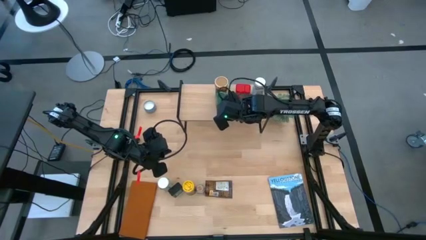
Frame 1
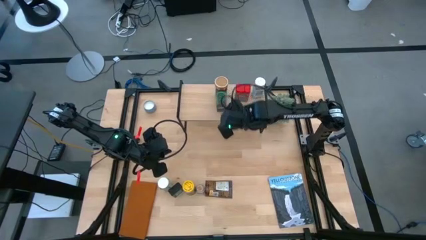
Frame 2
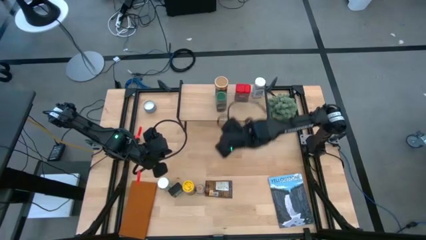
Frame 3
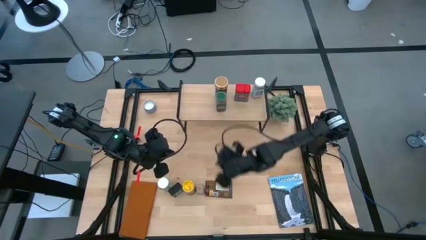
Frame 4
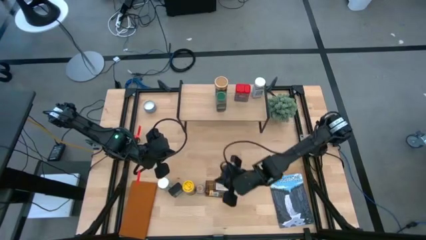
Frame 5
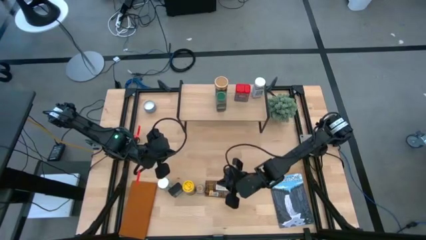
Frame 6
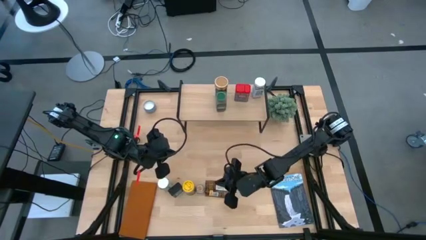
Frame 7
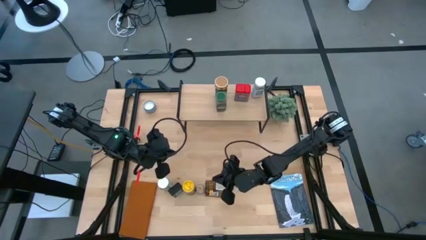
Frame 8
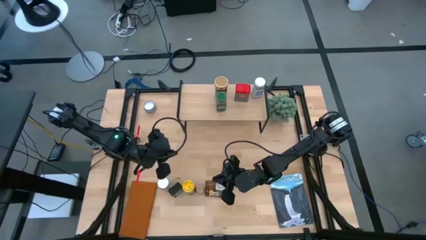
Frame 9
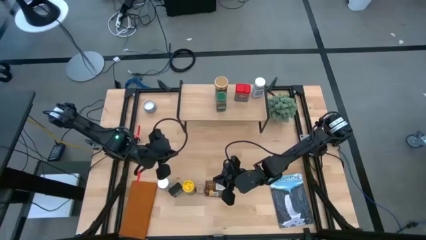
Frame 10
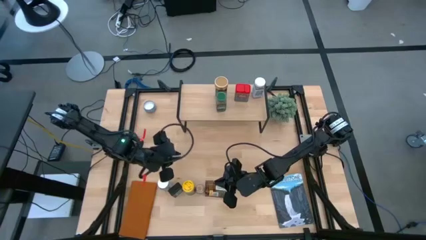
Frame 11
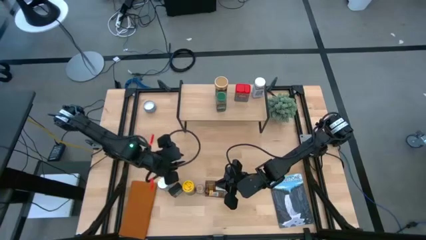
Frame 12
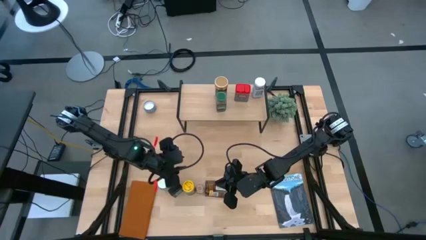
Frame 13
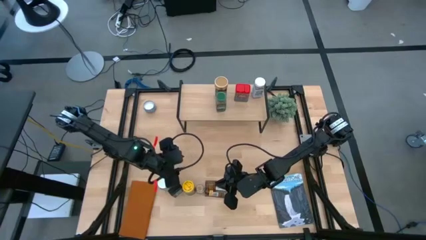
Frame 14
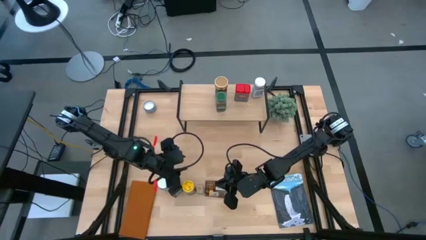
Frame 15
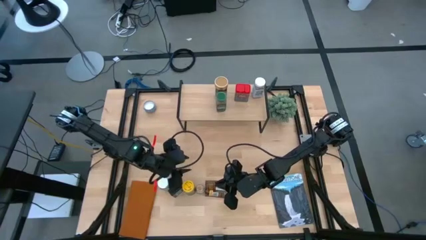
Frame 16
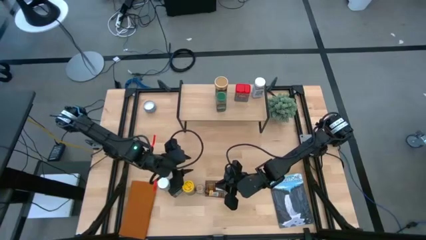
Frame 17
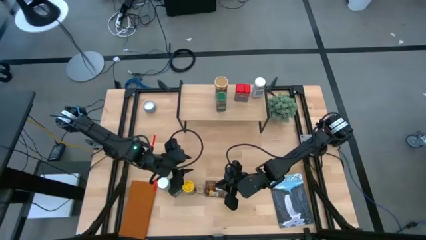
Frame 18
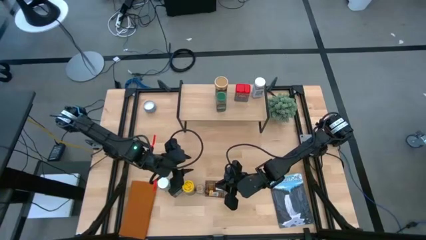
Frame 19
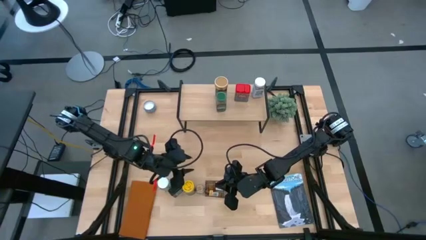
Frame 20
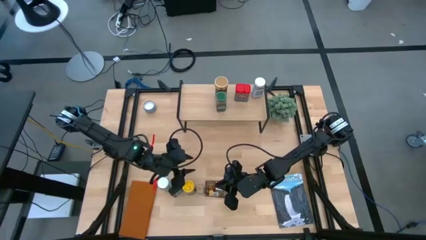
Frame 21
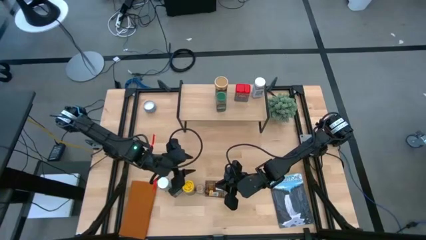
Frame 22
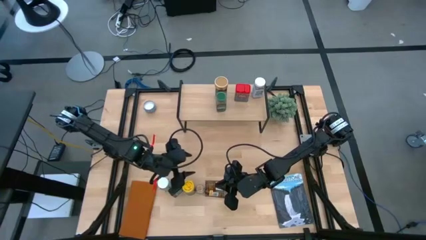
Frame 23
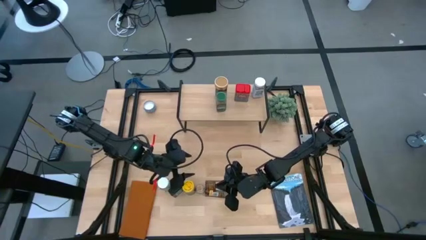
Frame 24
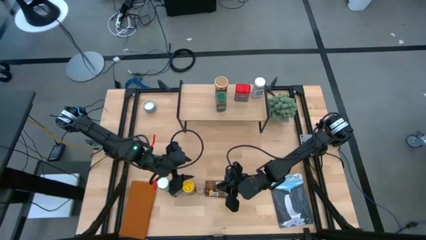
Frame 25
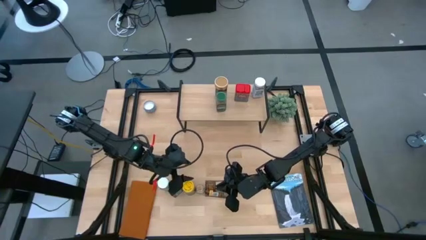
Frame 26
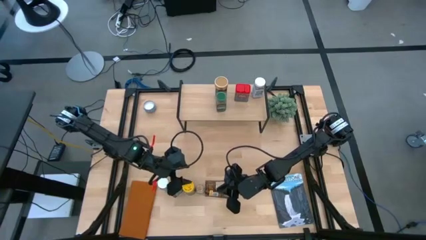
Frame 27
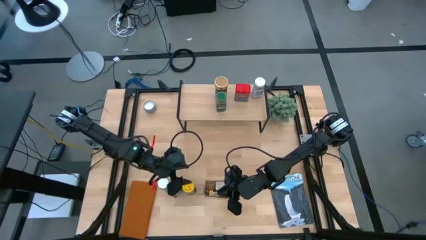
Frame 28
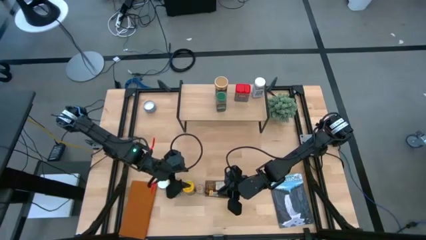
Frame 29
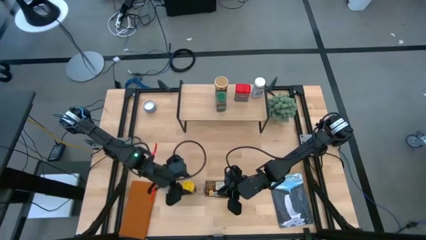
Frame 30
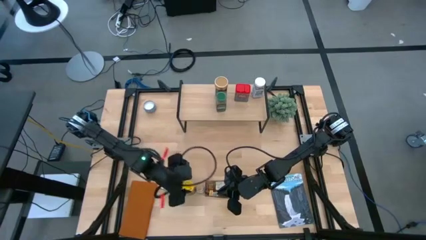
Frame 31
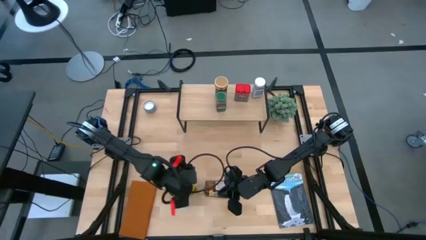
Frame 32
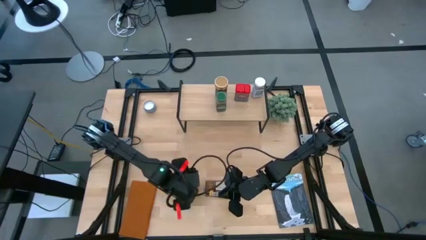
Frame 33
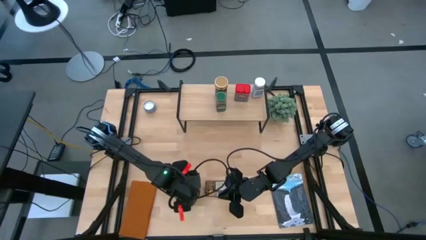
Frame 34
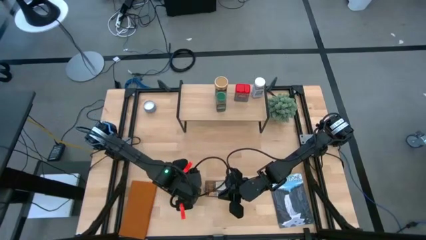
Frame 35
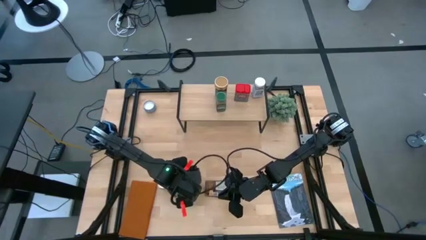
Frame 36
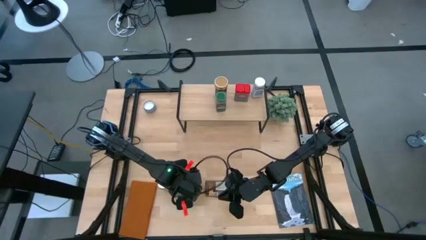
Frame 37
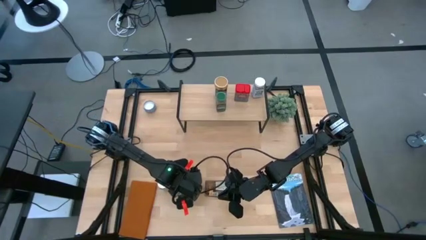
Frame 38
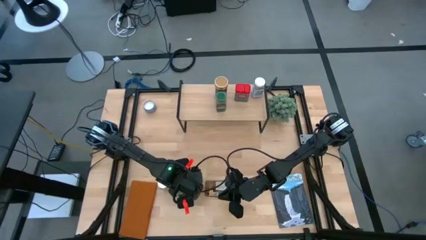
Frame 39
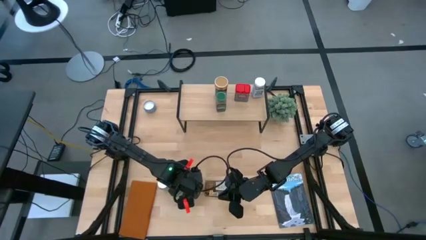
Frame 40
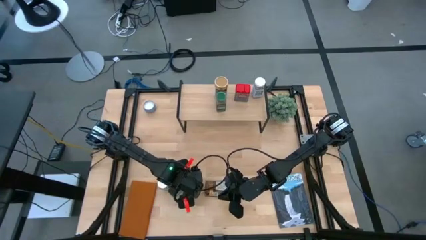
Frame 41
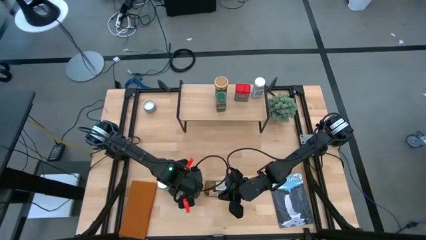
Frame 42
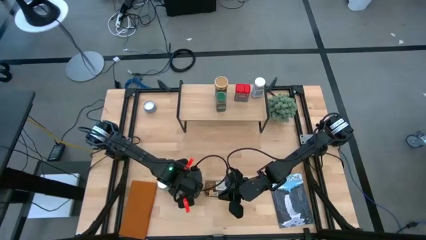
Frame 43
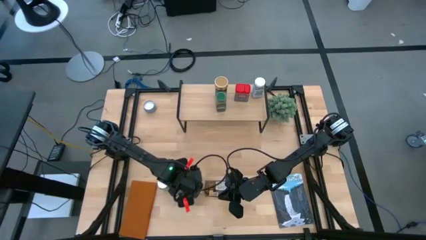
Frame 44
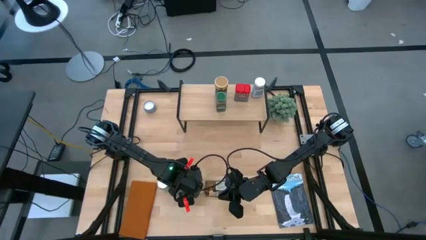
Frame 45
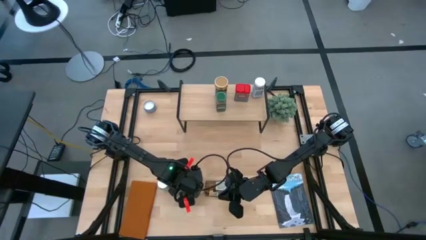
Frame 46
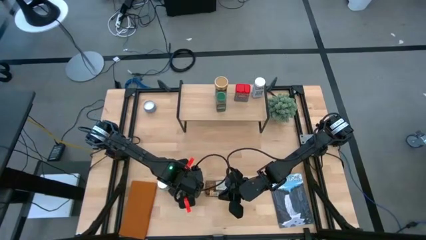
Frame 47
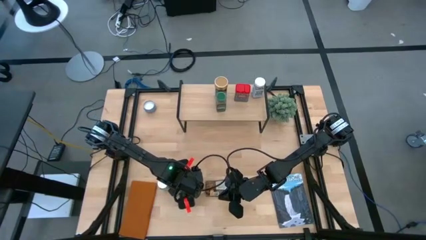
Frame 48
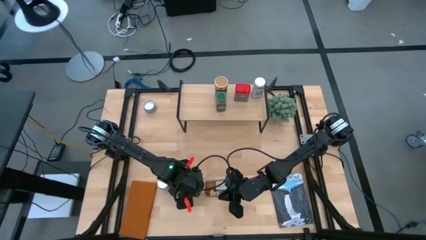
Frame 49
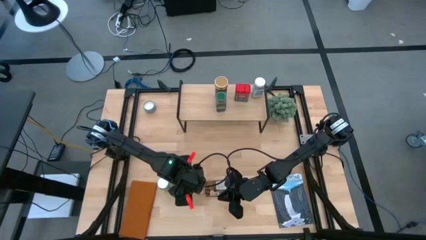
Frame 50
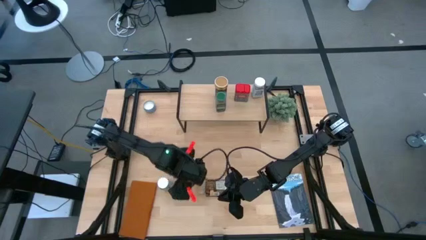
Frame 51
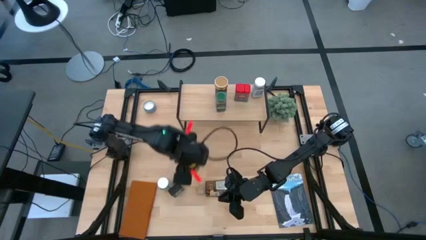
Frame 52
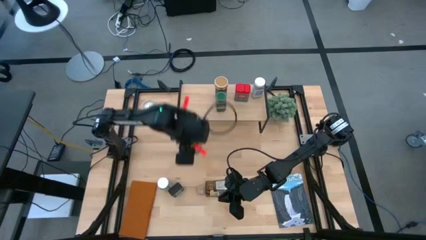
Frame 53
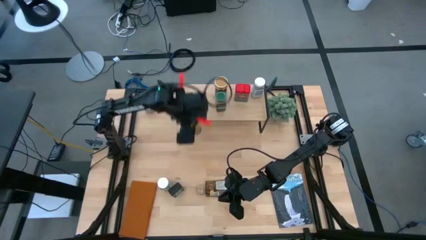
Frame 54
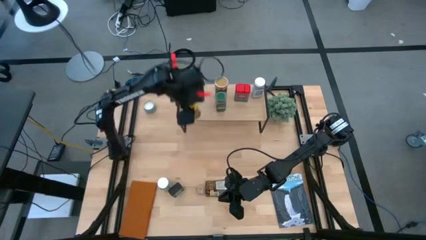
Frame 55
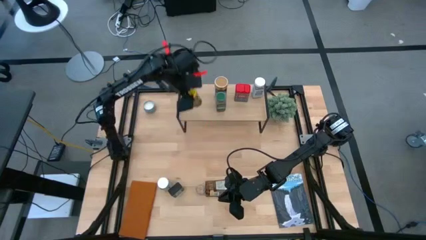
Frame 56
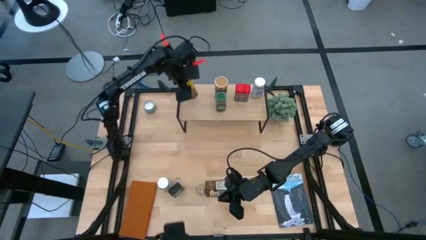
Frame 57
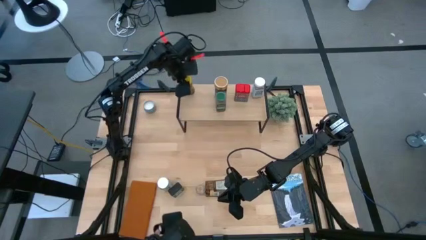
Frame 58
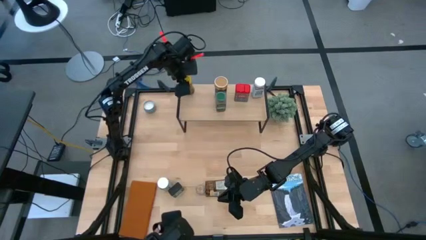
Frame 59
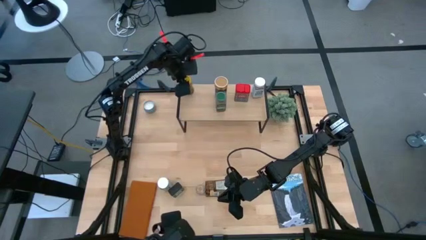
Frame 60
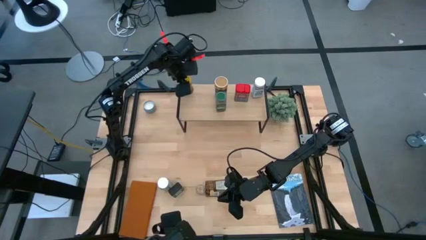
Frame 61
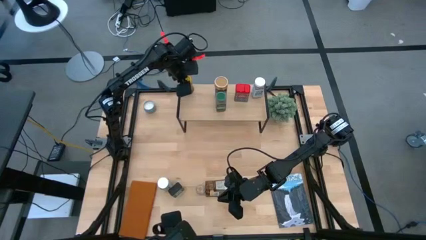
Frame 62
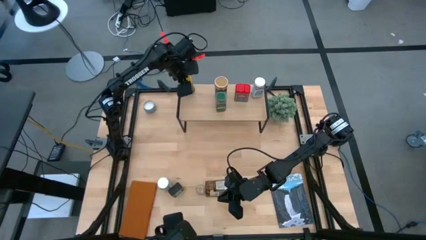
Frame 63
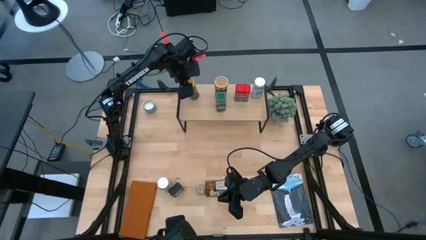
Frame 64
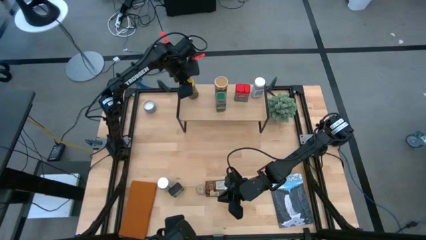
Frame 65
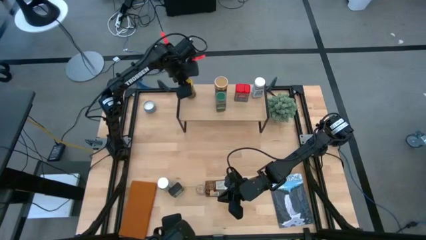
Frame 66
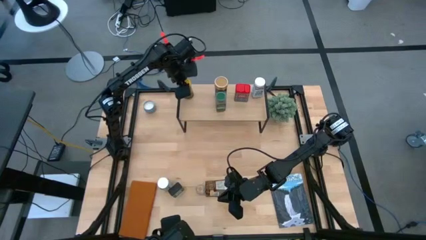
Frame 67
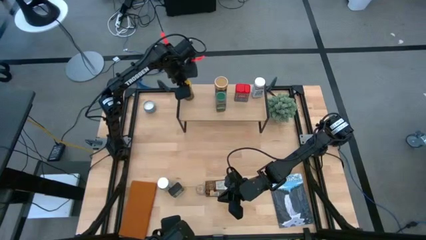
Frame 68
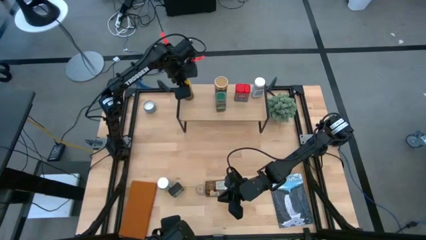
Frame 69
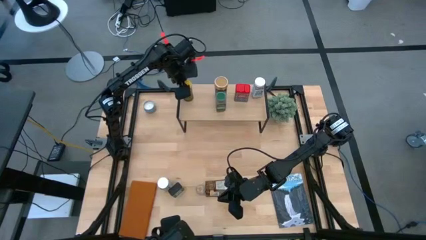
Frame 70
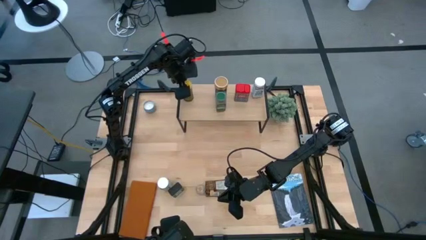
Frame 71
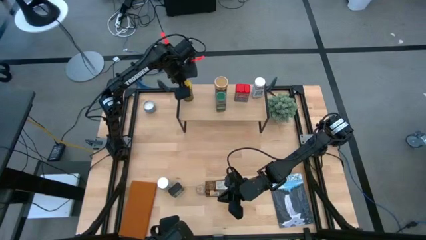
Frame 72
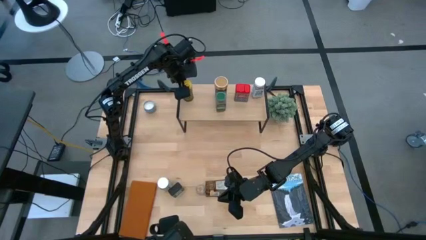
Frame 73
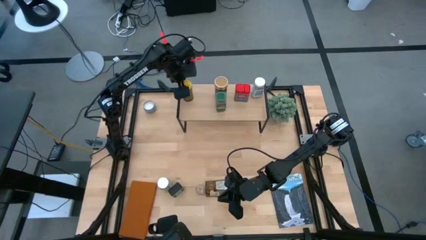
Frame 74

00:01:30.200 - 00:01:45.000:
Task: Shelf spices
Put the yellow seasoning bottle on the shelf
